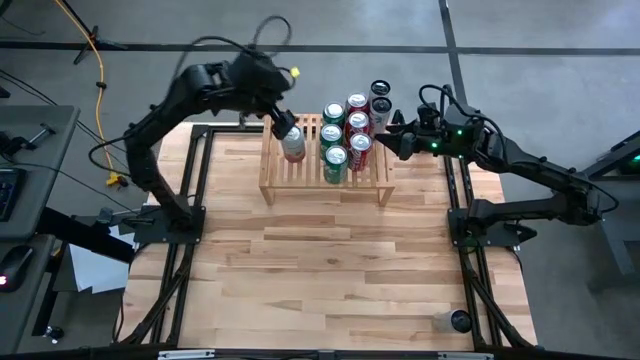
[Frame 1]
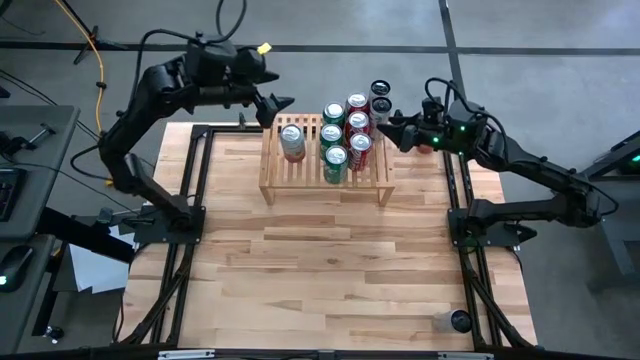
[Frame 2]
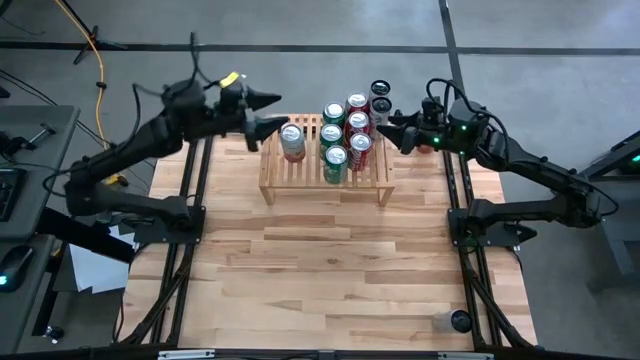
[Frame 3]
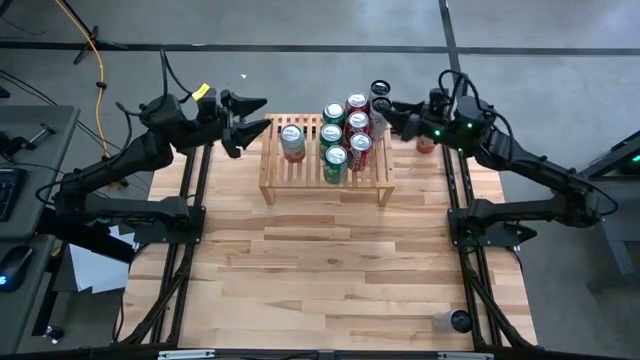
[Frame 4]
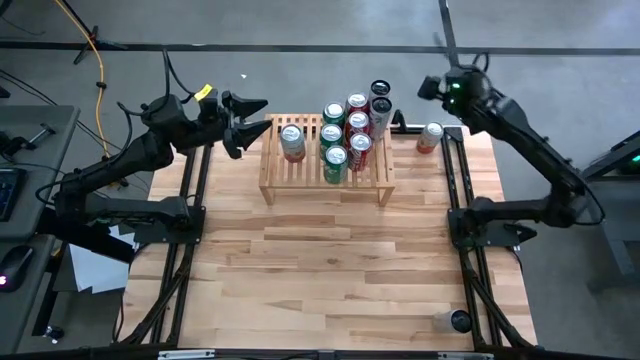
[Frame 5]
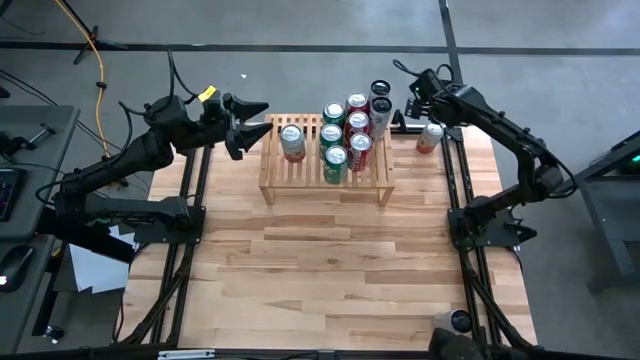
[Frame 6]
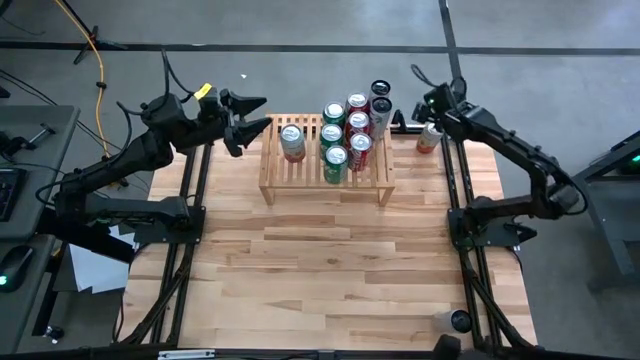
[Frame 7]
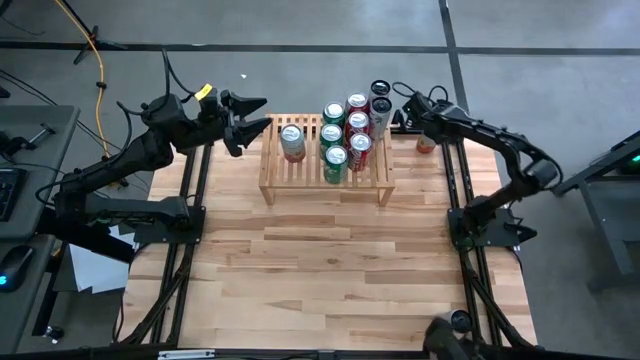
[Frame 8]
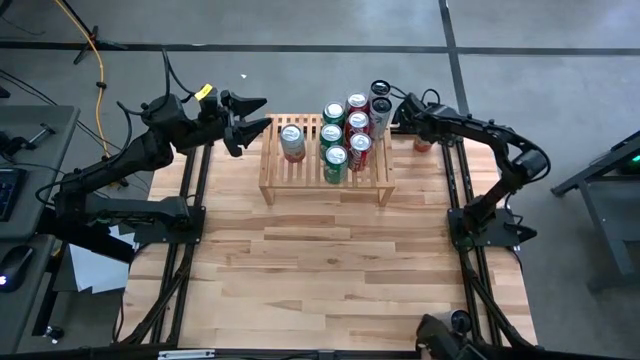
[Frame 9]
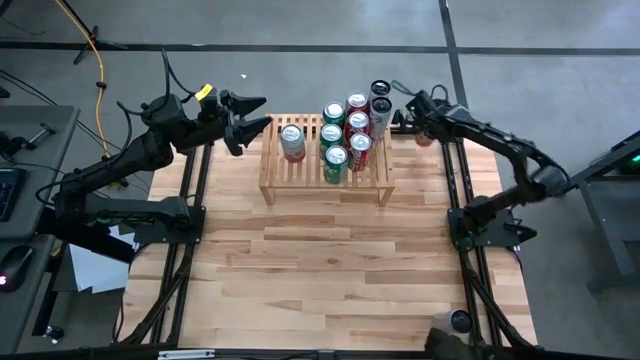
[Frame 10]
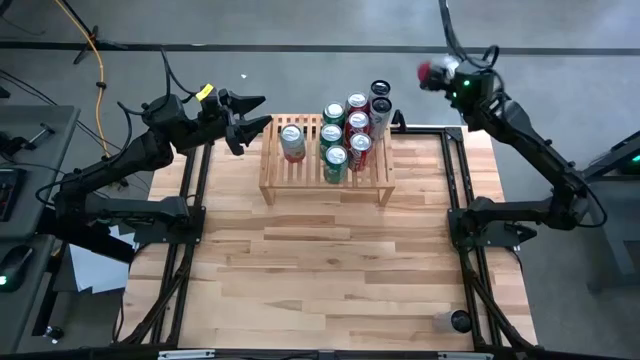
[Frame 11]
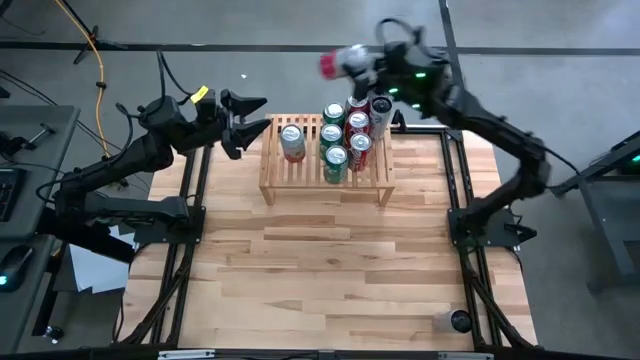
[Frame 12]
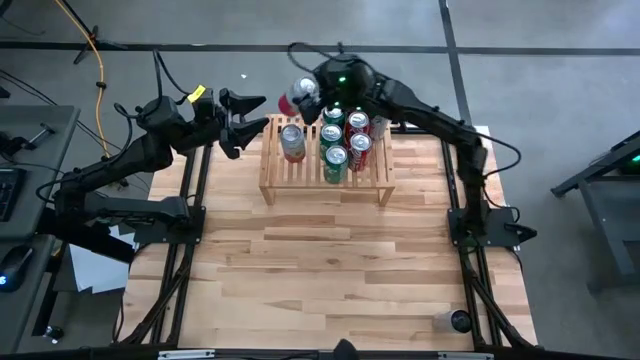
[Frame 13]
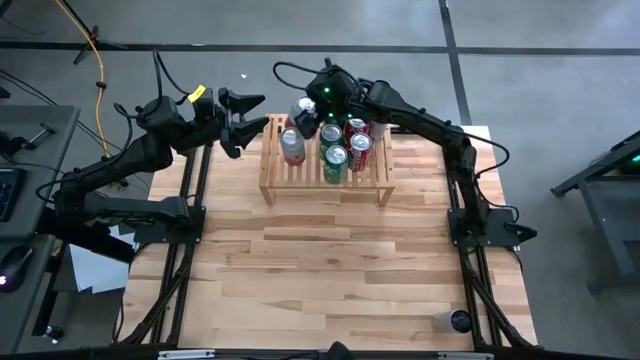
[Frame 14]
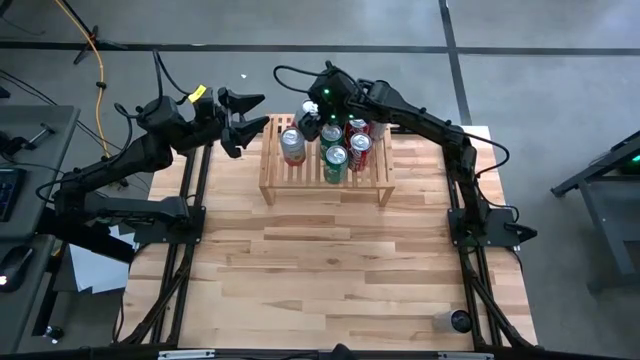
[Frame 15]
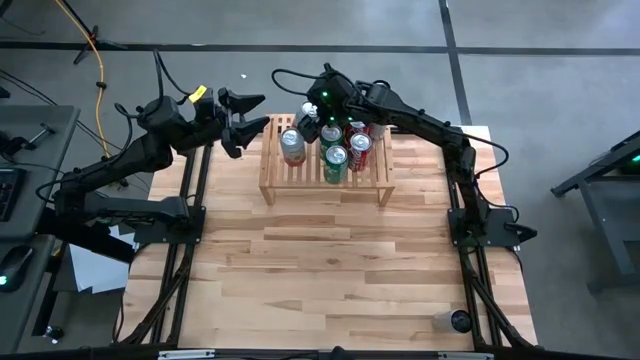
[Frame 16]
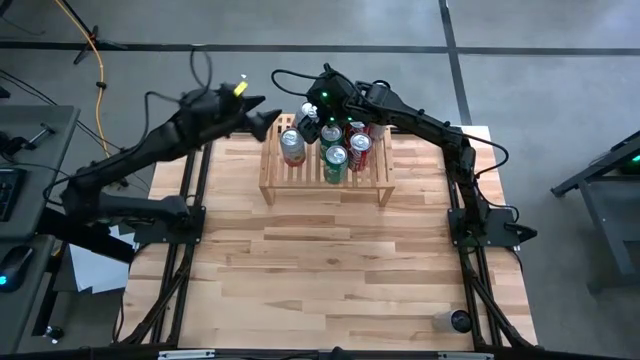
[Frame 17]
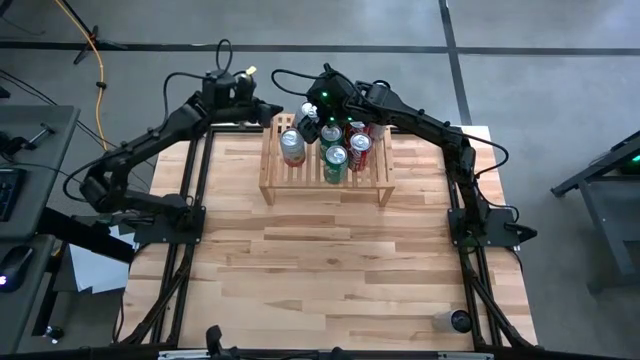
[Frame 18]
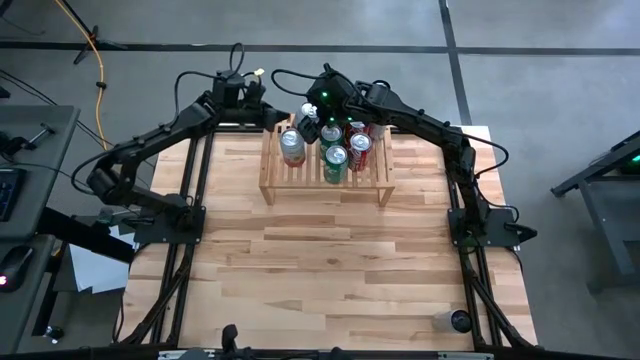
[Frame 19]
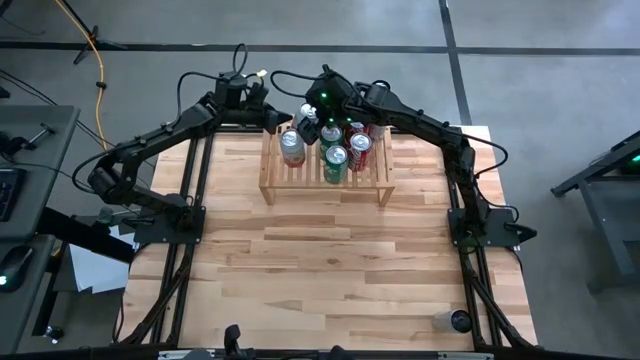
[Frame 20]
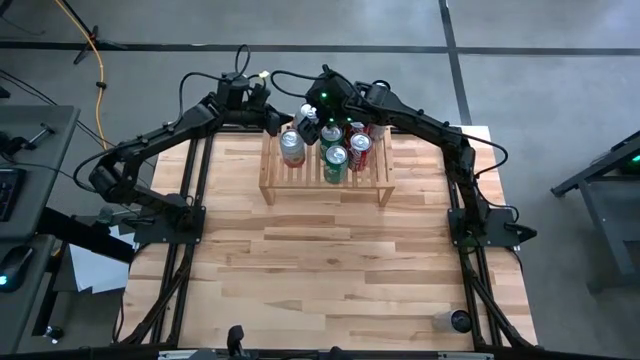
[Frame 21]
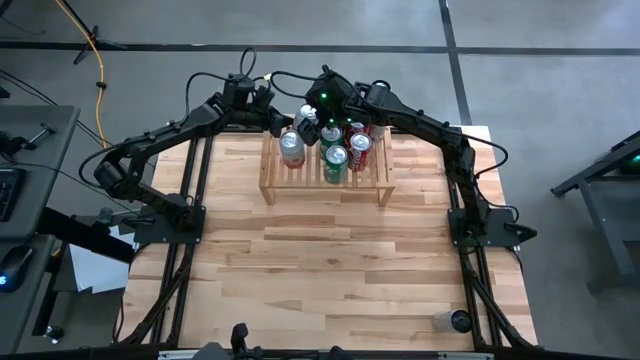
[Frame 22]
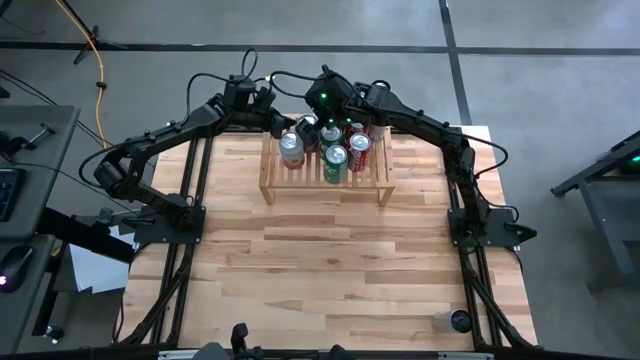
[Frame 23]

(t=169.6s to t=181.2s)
Task: Place canned beverage on shelf
Put the pink soda can on the shelf aligned with the other pink soda can

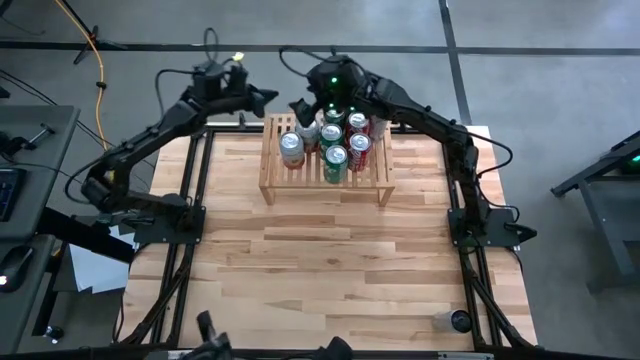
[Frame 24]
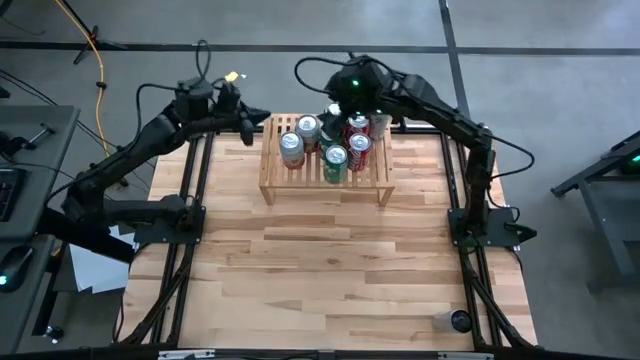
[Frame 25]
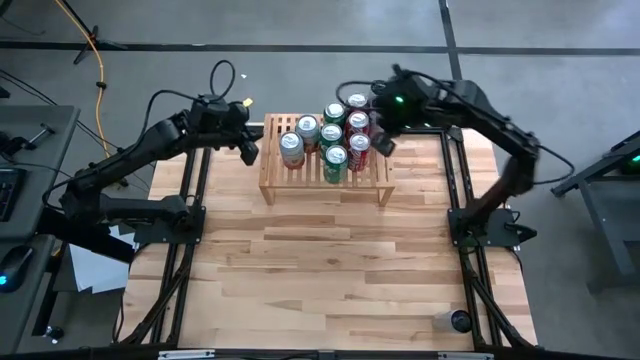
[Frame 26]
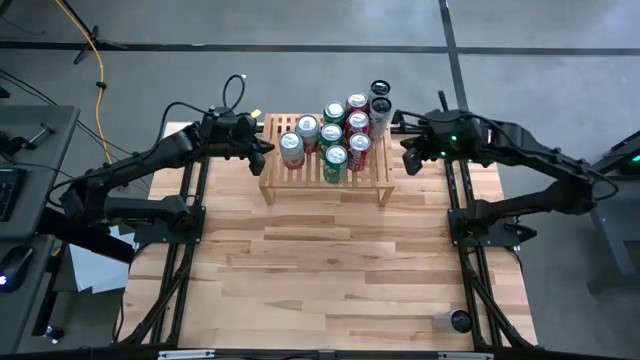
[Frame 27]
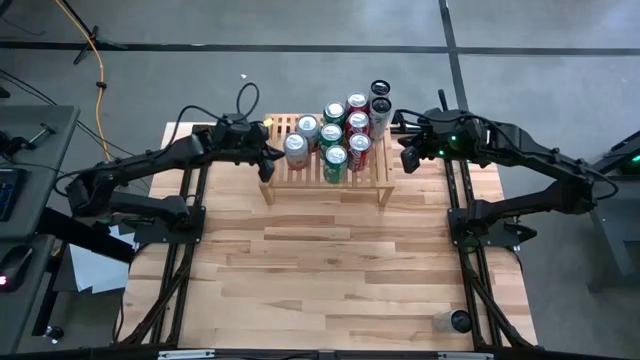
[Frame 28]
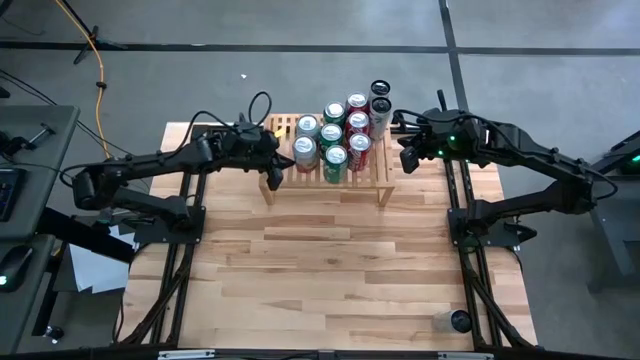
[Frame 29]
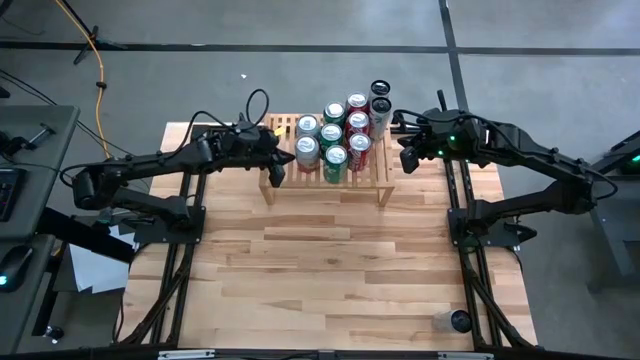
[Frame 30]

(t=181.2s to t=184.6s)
Adjust the pink soda can on the shelf

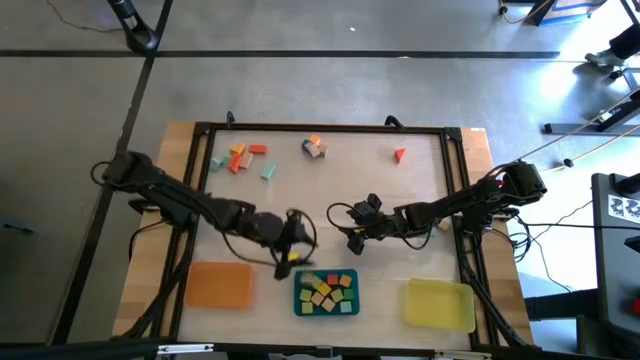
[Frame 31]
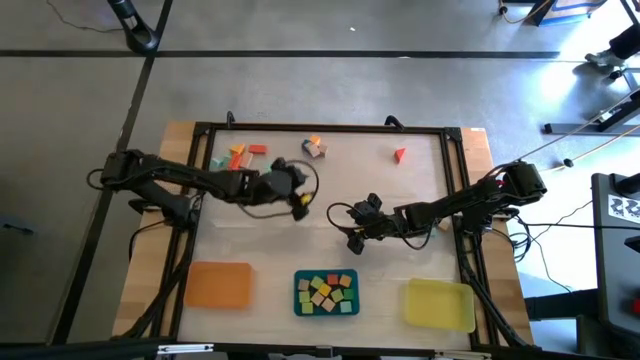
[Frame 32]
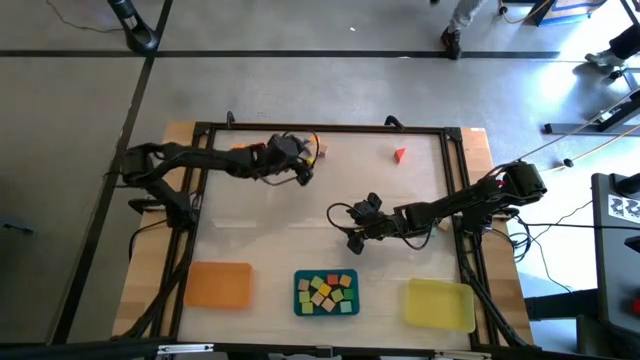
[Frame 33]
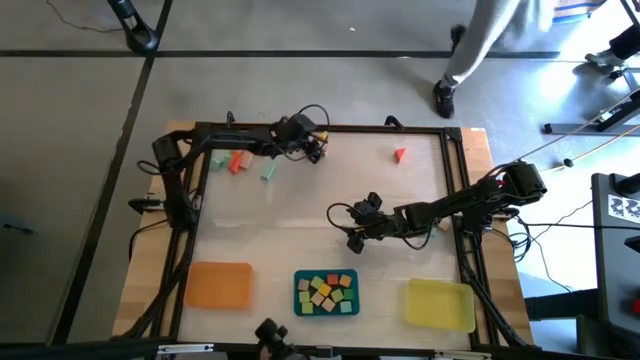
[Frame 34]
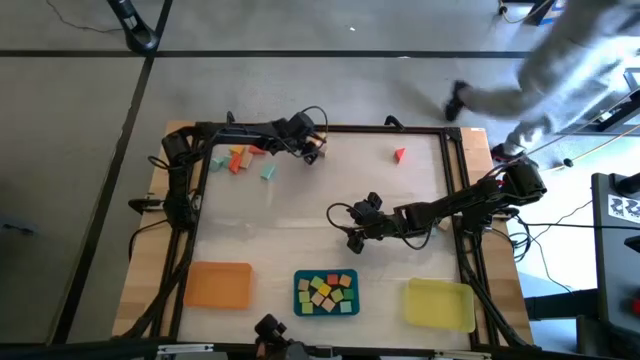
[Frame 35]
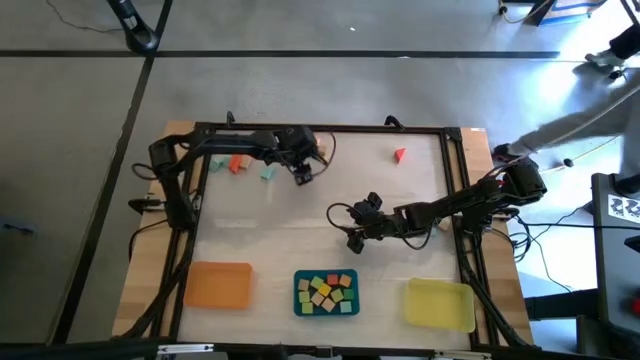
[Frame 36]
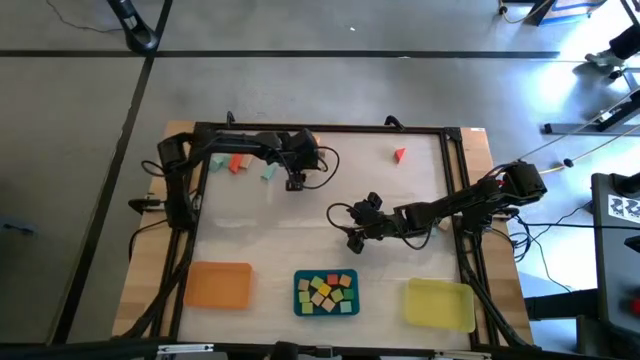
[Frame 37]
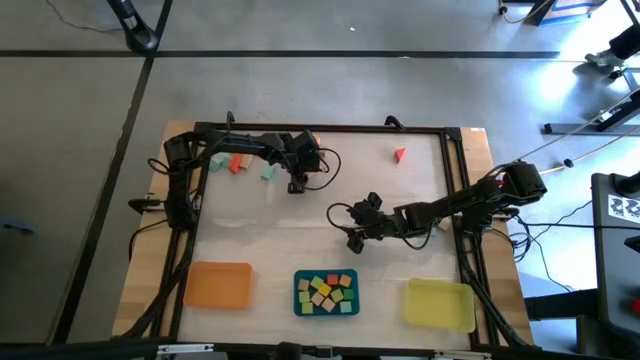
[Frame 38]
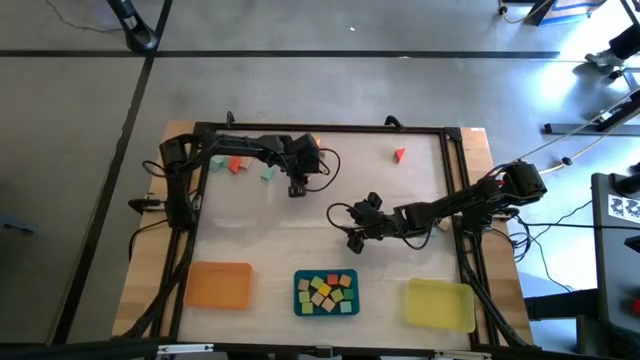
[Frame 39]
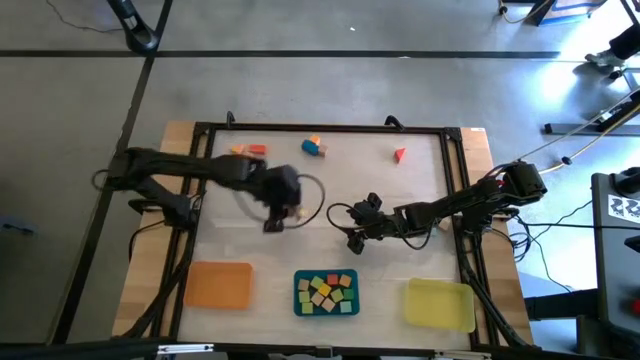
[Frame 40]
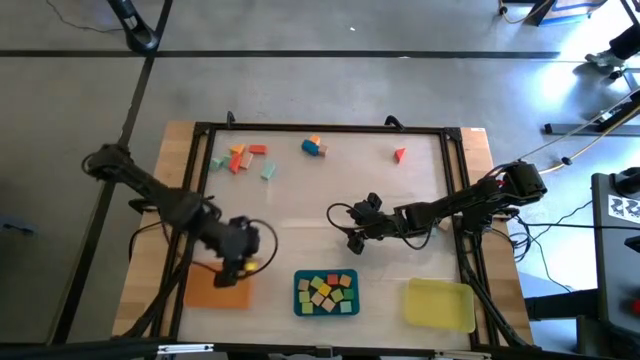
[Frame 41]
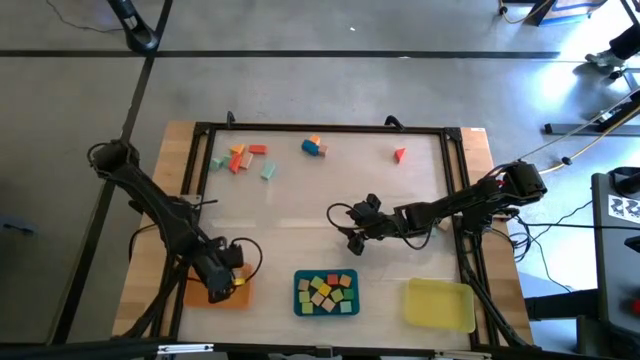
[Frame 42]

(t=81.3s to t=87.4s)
Task: Sort blocks by size
Put the brown triangular block into the orange bin
